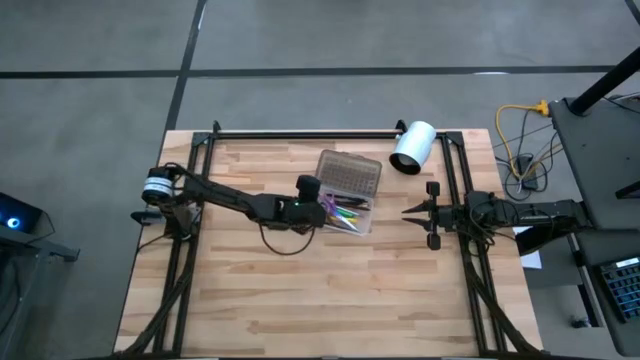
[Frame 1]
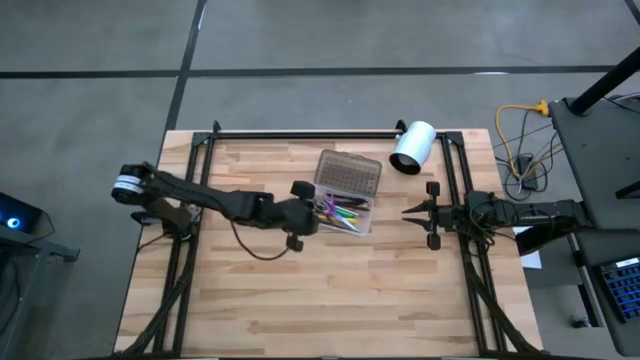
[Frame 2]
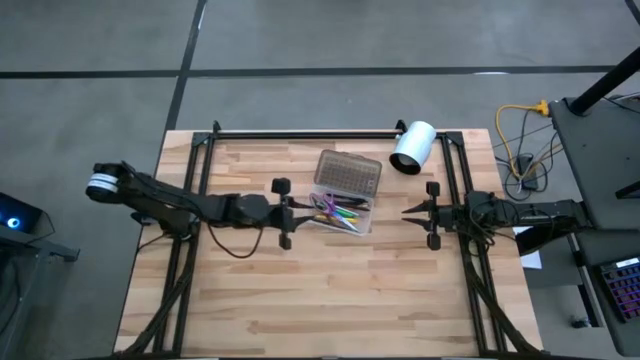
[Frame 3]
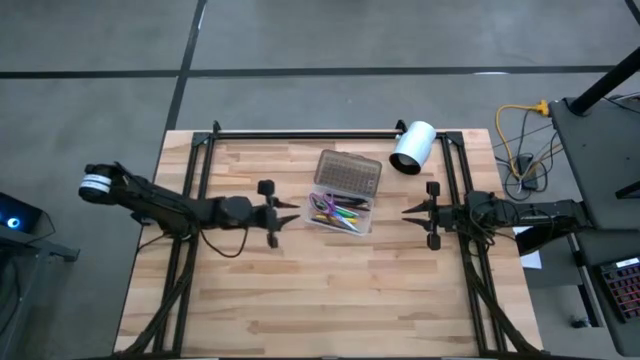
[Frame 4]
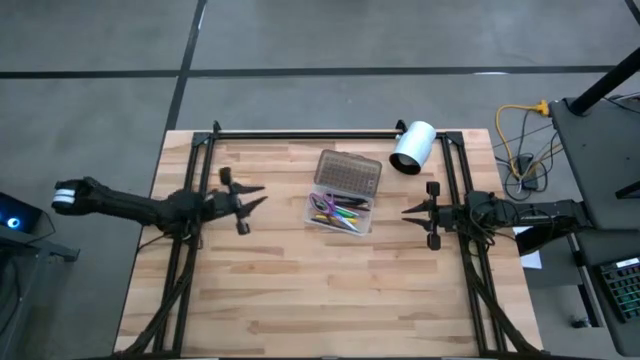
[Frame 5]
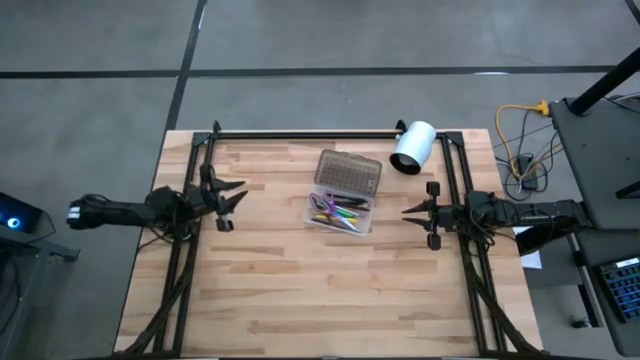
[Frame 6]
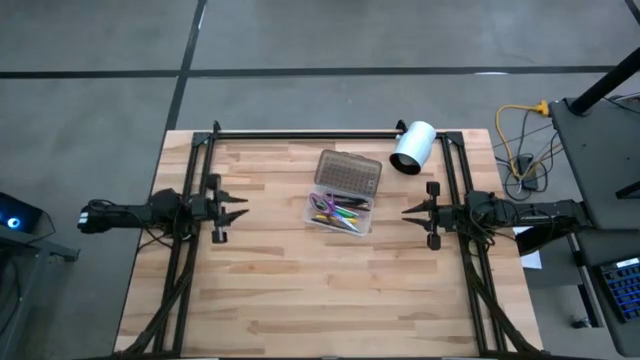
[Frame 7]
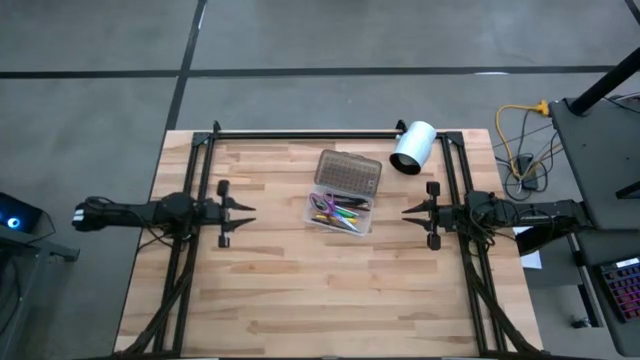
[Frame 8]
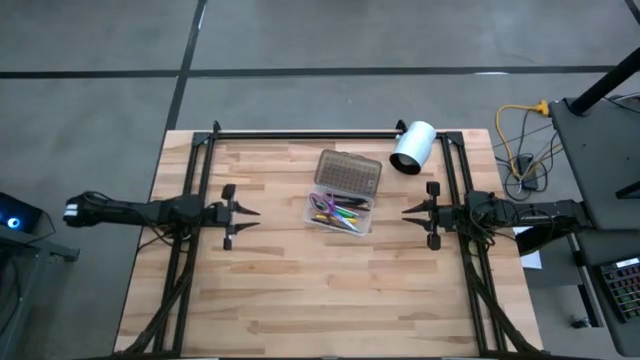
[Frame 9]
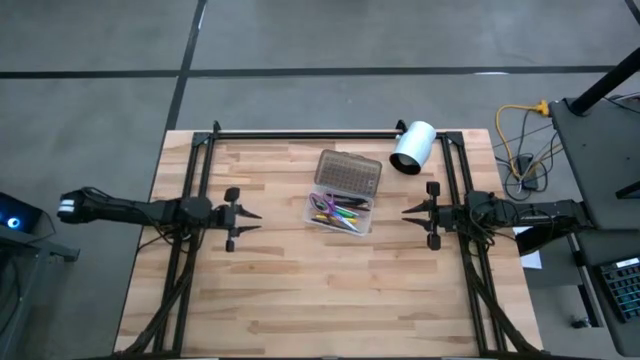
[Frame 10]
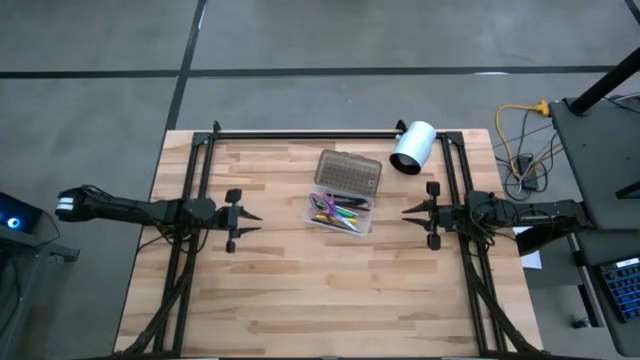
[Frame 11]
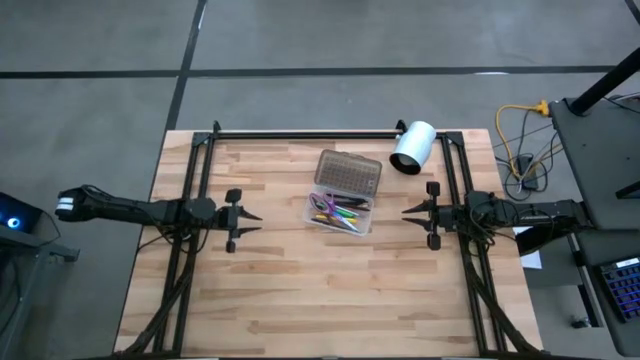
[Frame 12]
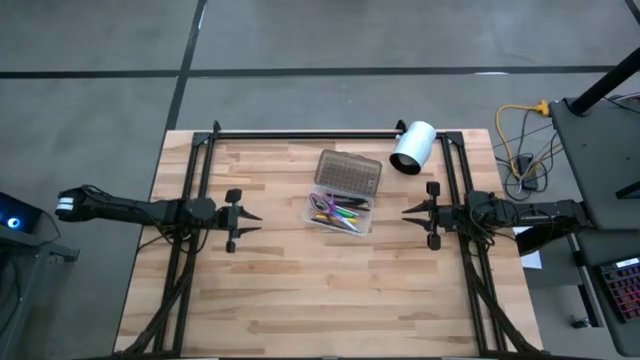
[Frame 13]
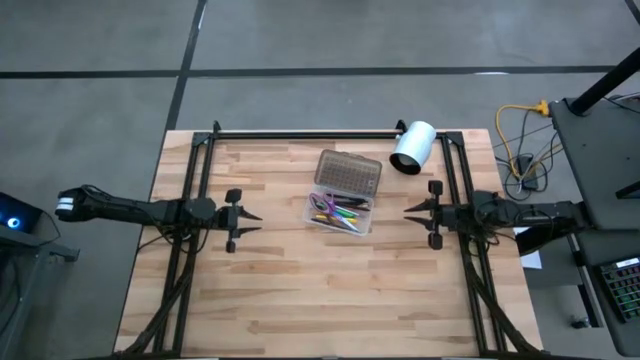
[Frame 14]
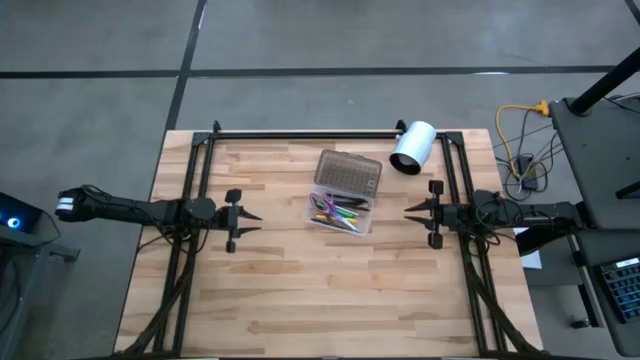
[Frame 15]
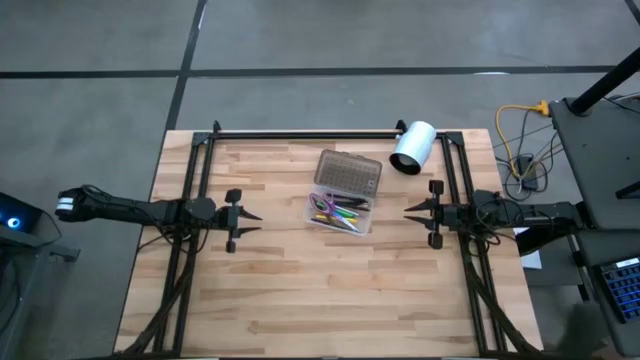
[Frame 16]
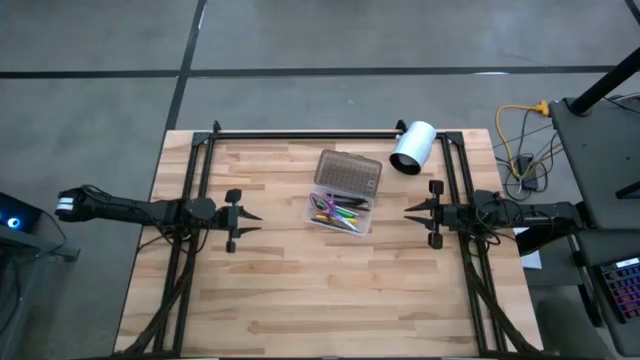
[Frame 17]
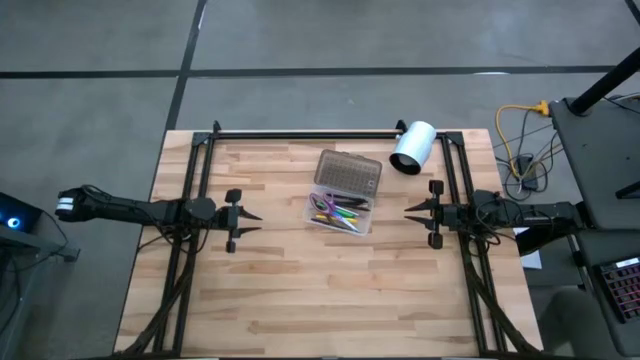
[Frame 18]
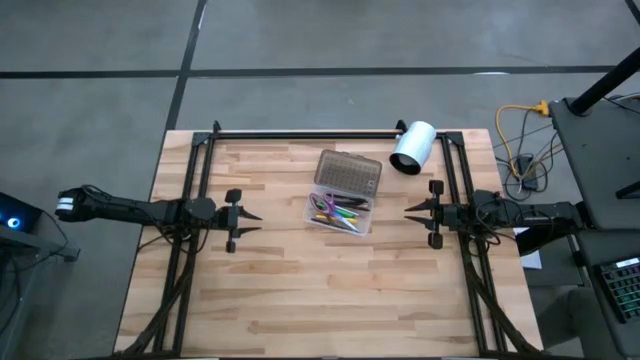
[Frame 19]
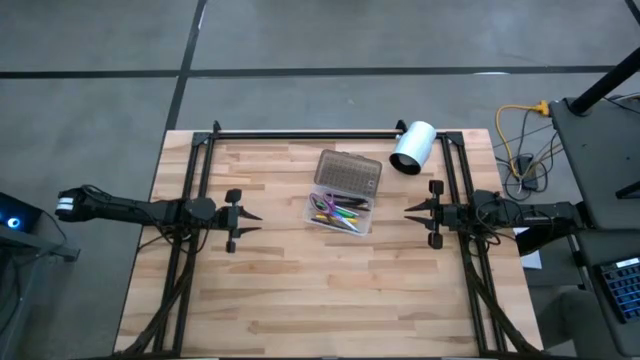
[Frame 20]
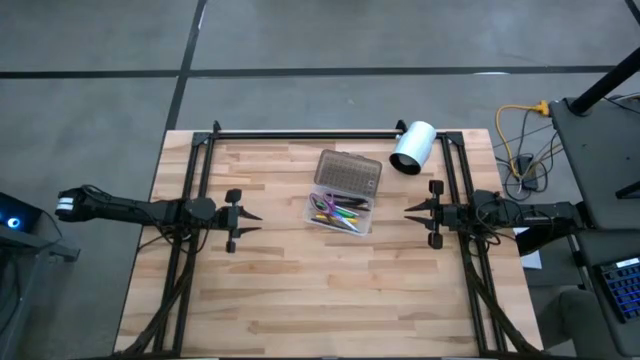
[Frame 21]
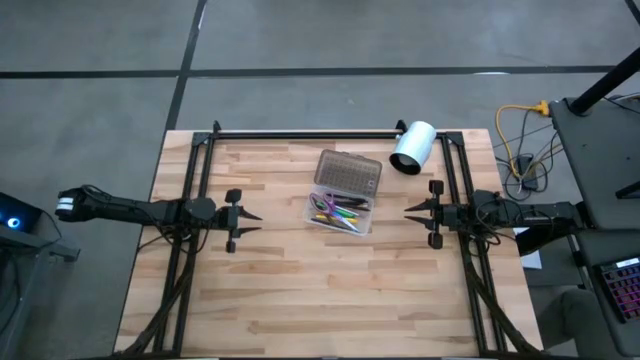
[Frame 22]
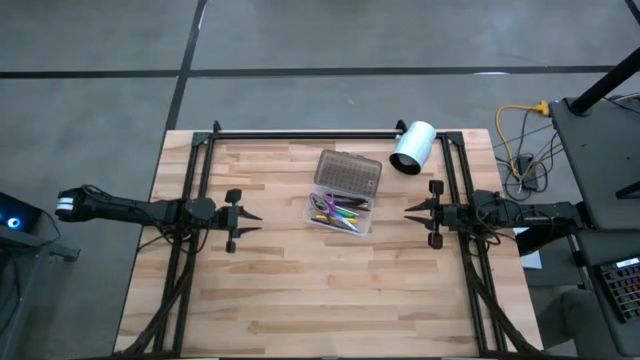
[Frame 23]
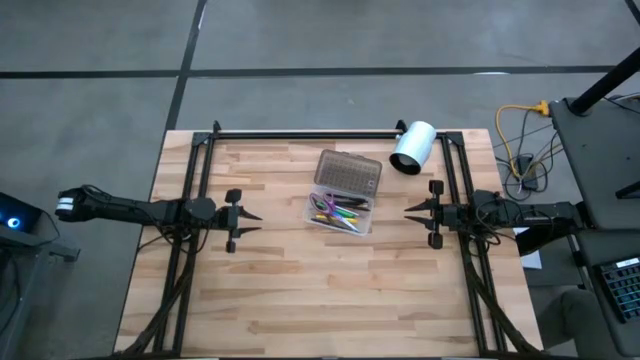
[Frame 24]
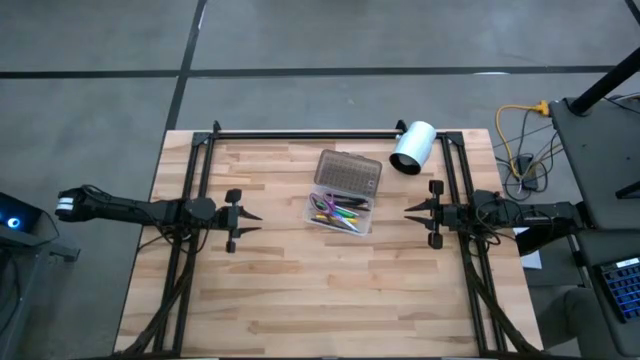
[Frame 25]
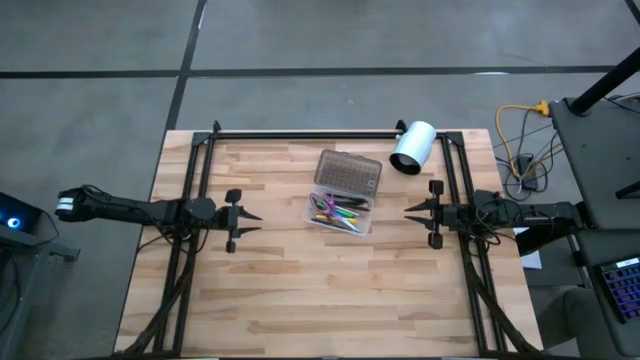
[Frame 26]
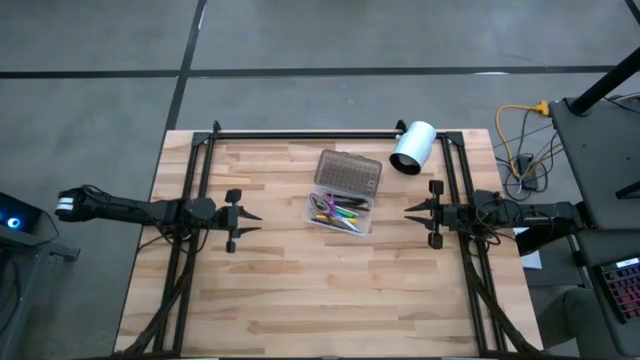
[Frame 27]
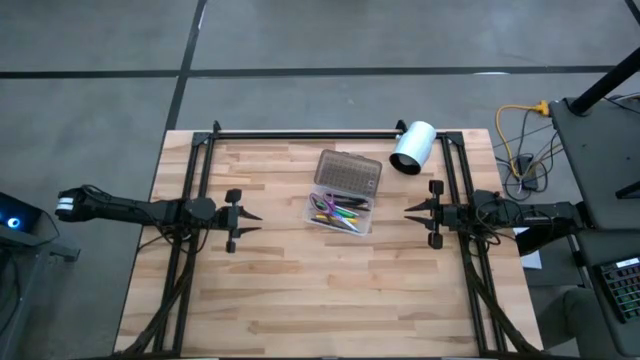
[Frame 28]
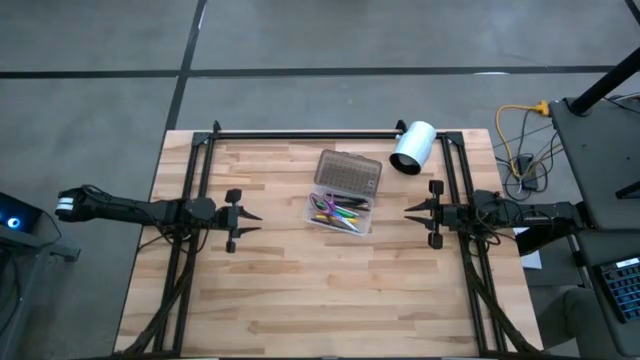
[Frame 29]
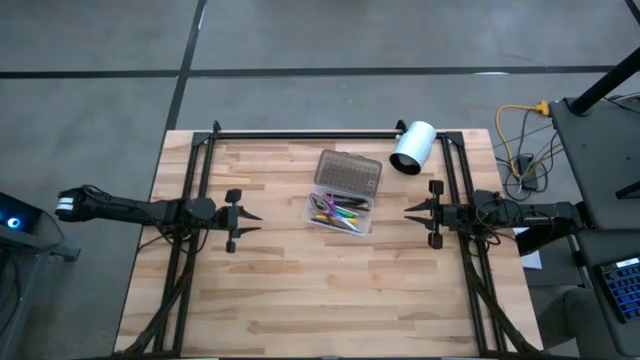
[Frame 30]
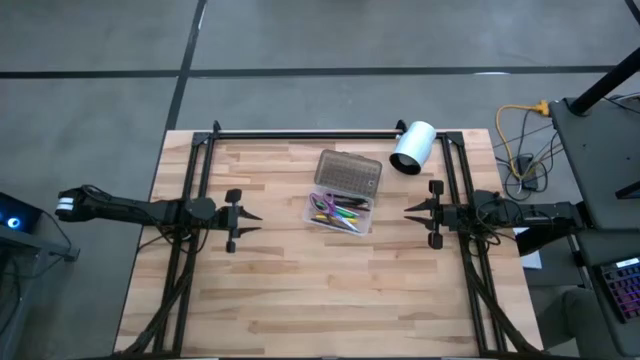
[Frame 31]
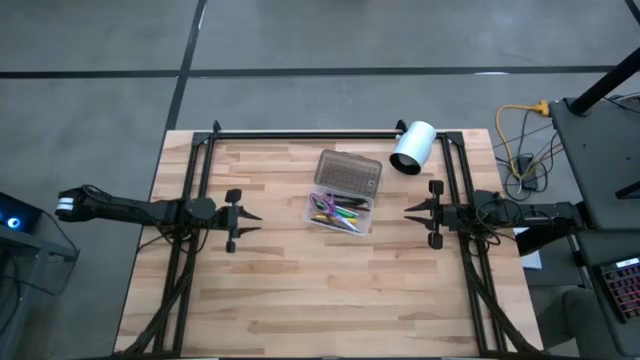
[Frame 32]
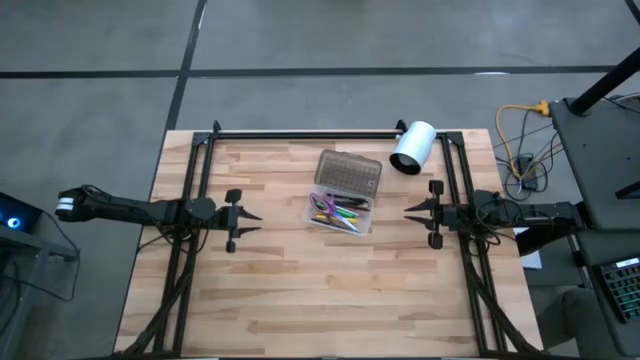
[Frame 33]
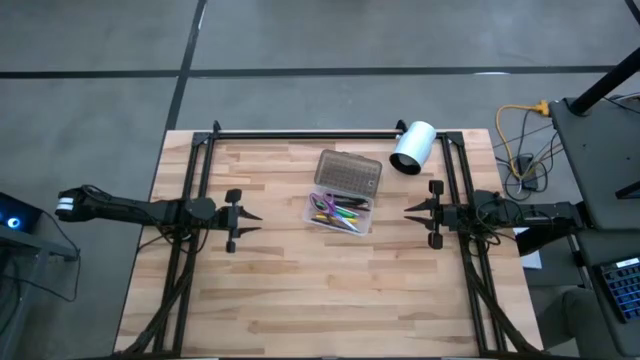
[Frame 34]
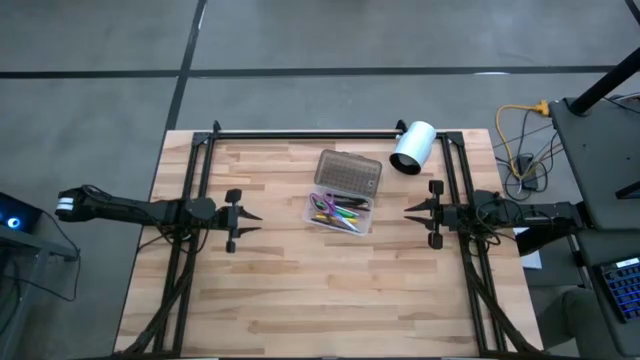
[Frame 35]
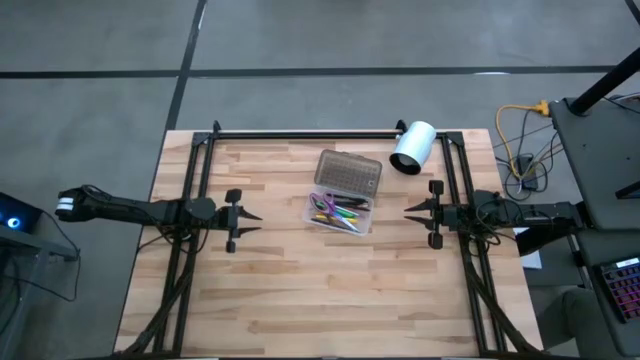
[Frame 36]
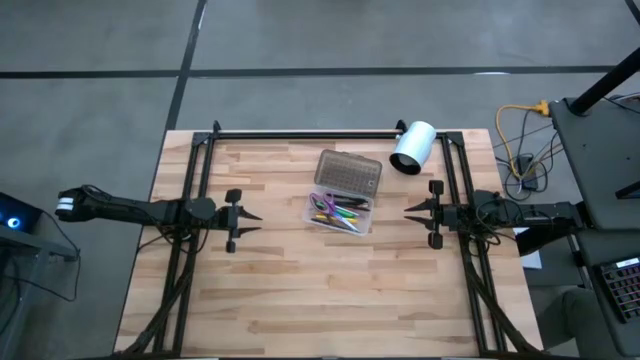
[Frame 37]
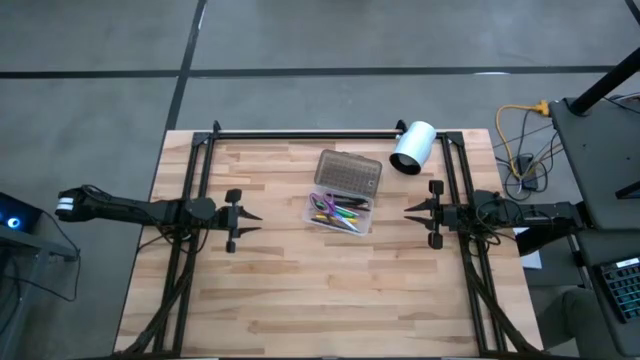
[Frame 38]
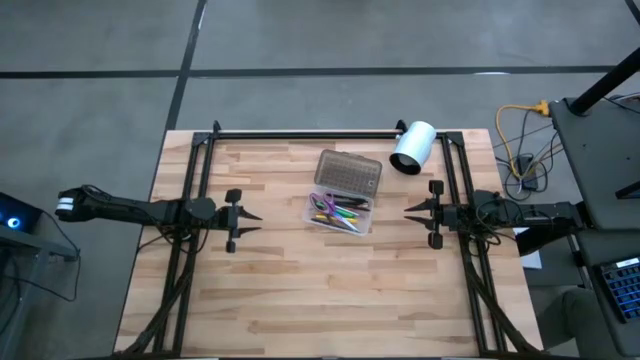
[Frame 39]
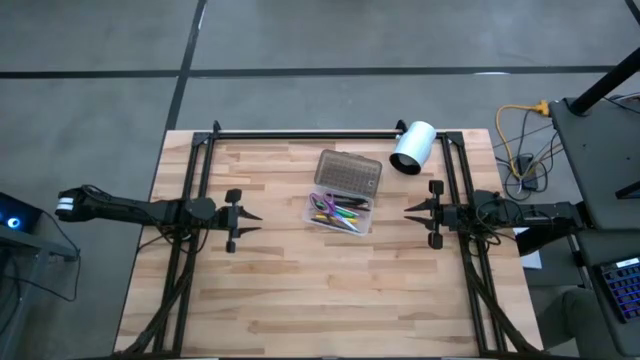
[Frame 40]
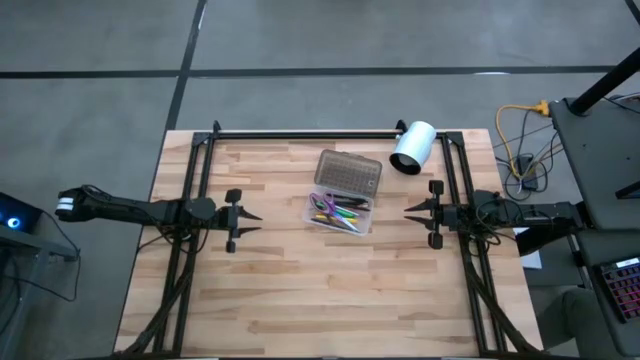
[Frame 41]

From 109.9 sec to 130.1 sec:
Task: Pick & place school supplies into a supply box
Return to Home Position
